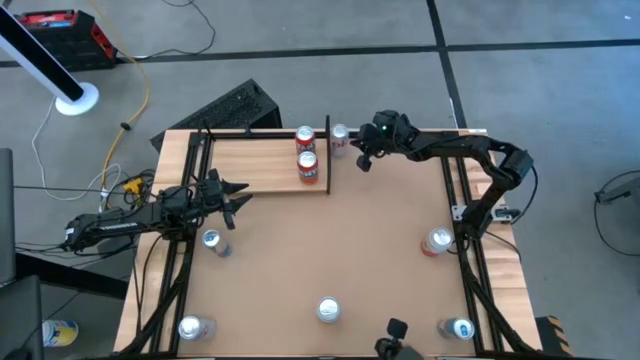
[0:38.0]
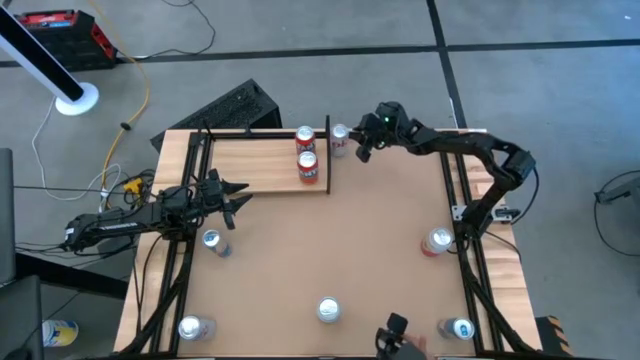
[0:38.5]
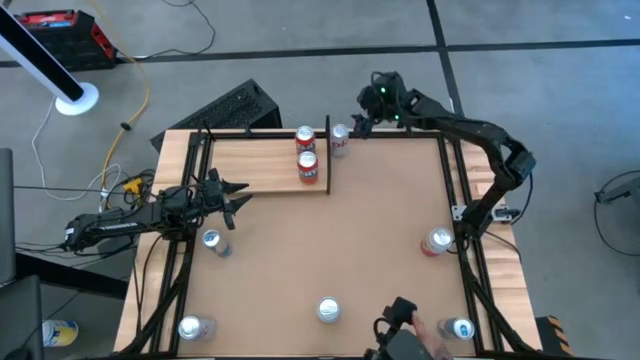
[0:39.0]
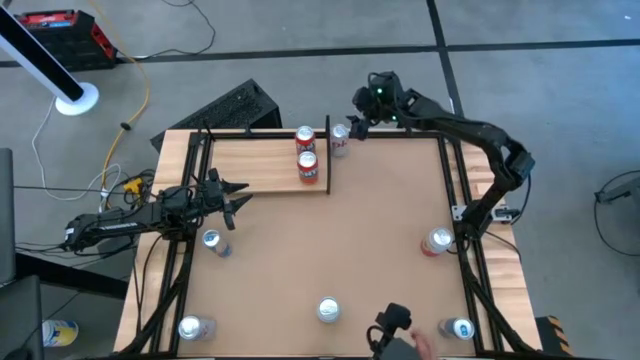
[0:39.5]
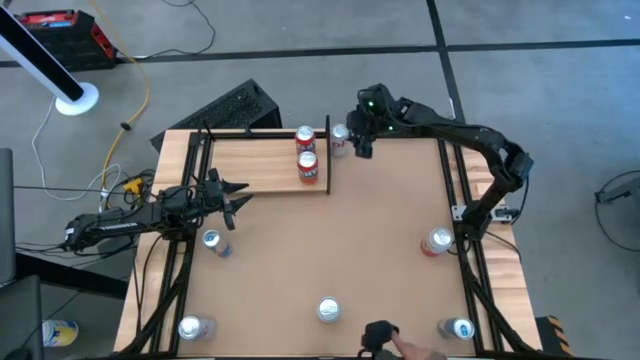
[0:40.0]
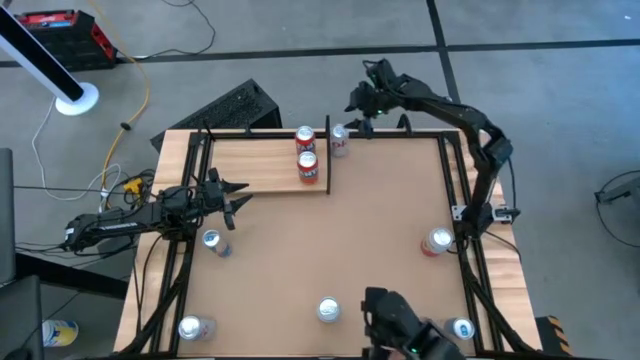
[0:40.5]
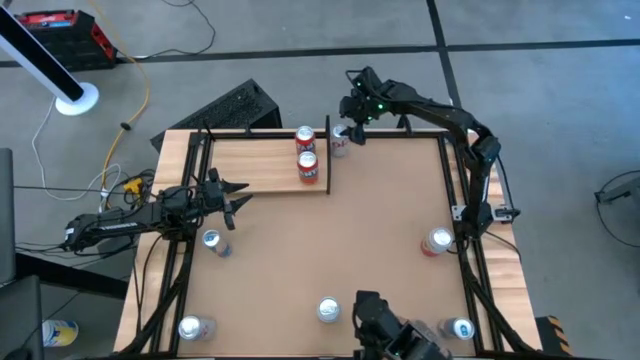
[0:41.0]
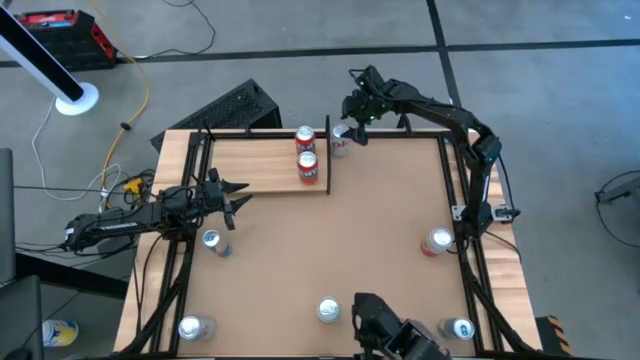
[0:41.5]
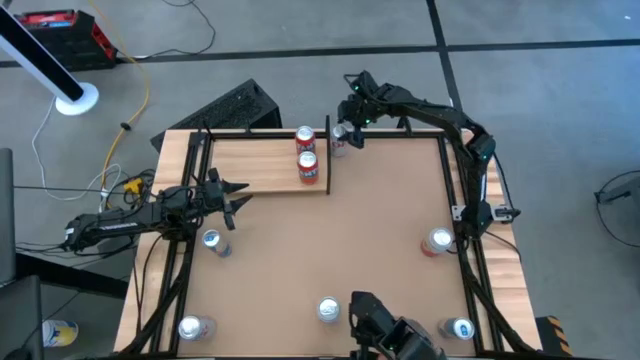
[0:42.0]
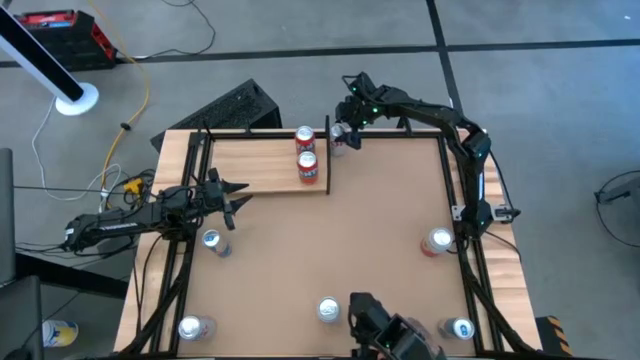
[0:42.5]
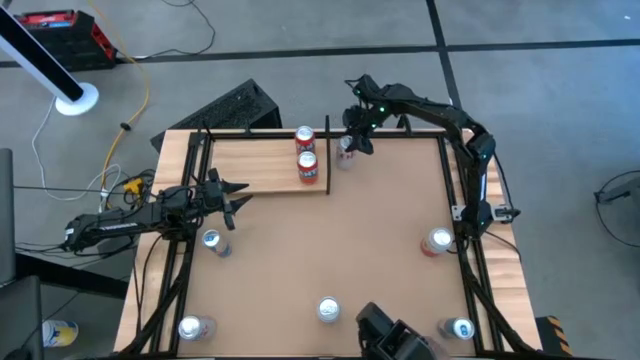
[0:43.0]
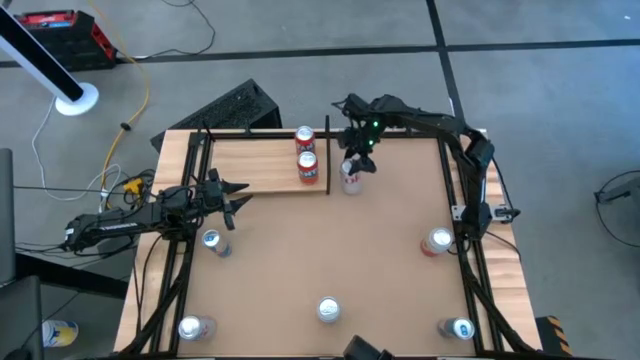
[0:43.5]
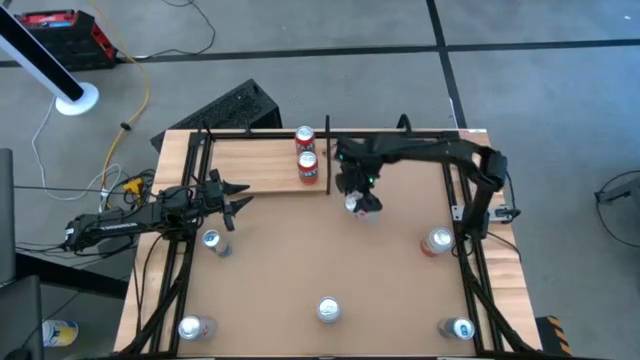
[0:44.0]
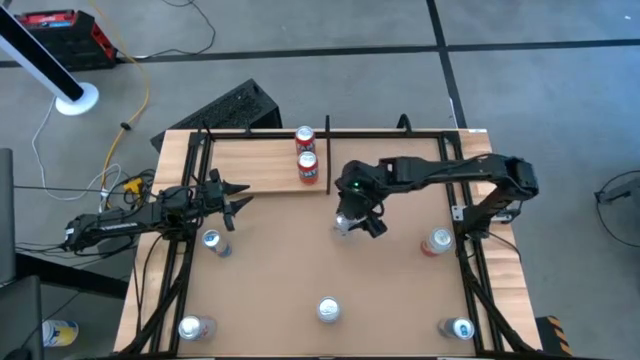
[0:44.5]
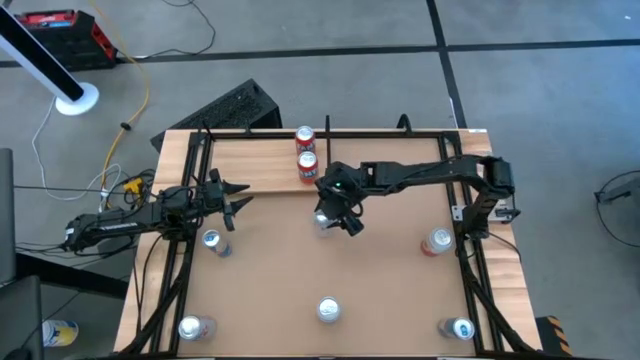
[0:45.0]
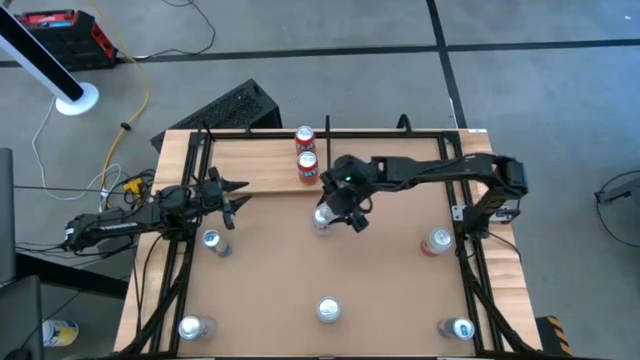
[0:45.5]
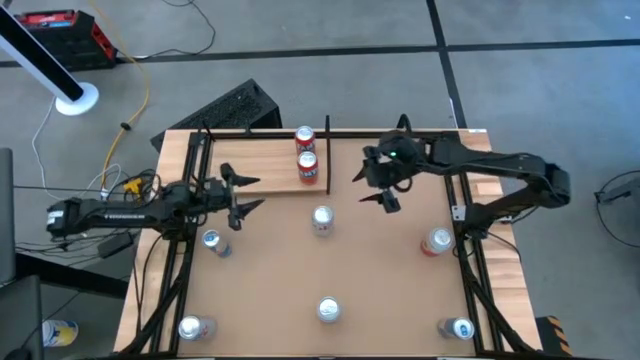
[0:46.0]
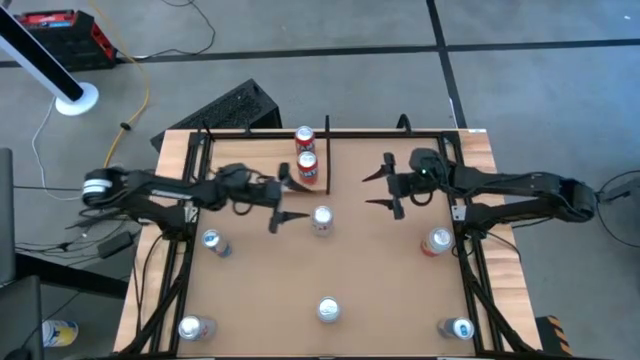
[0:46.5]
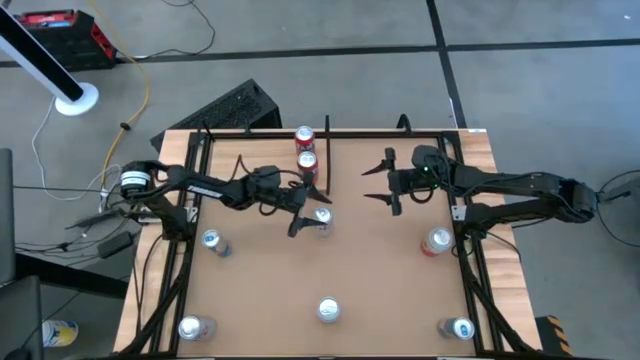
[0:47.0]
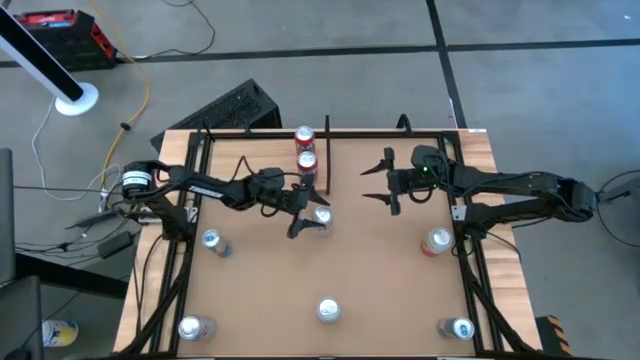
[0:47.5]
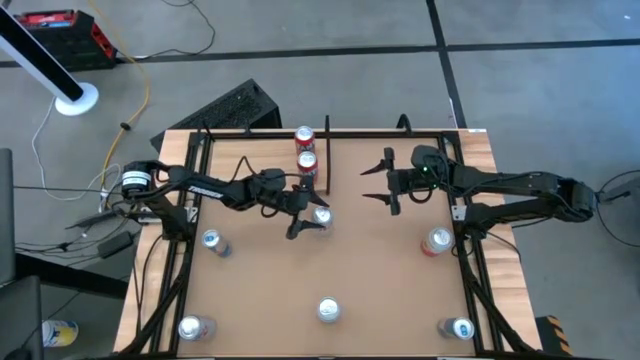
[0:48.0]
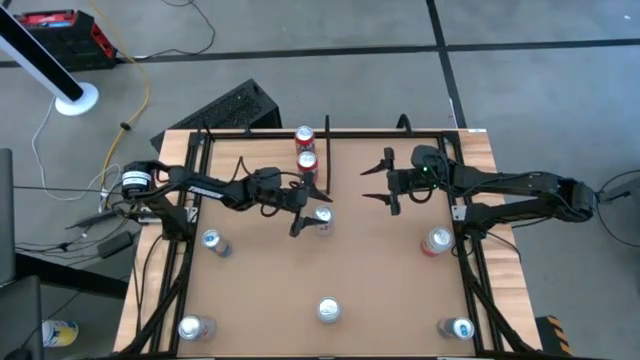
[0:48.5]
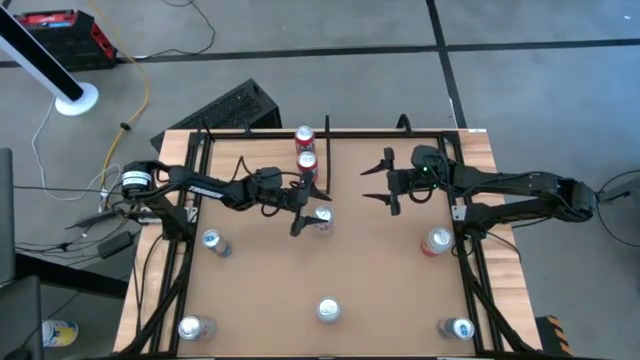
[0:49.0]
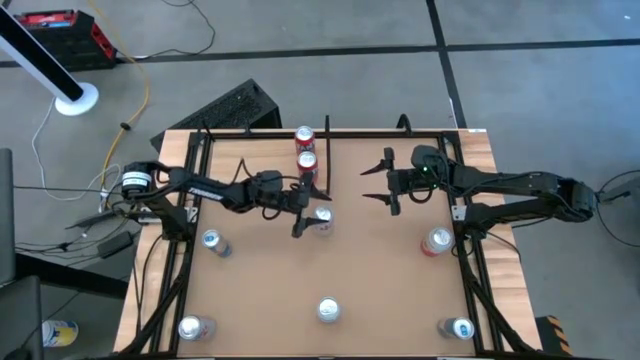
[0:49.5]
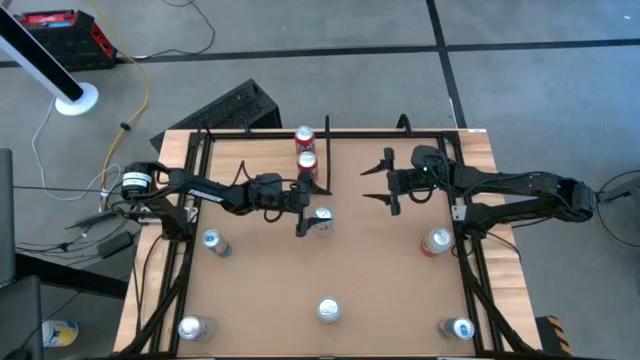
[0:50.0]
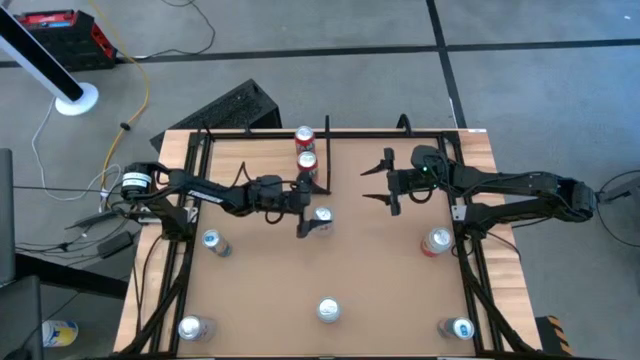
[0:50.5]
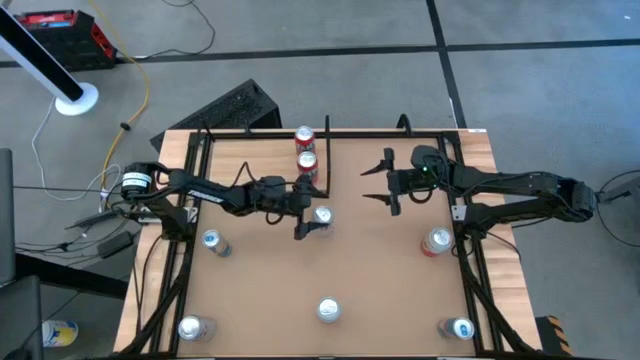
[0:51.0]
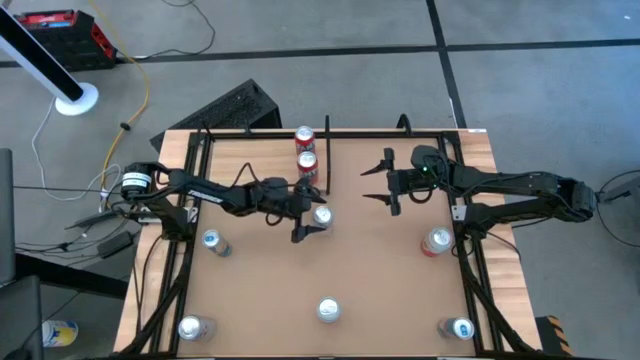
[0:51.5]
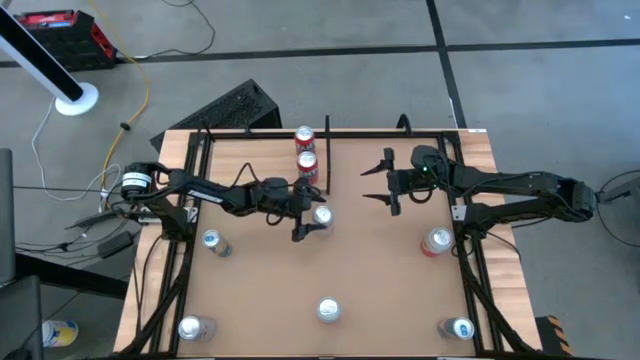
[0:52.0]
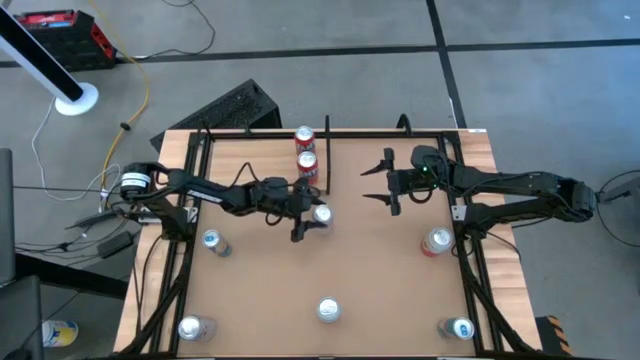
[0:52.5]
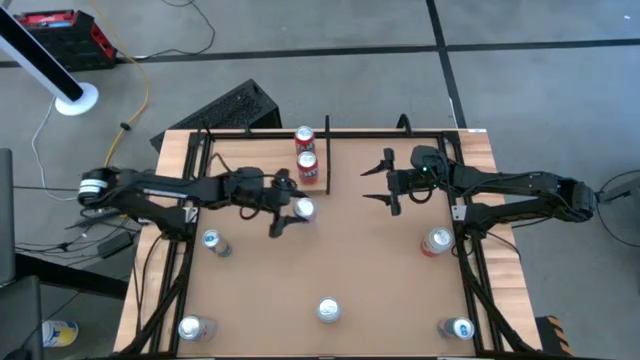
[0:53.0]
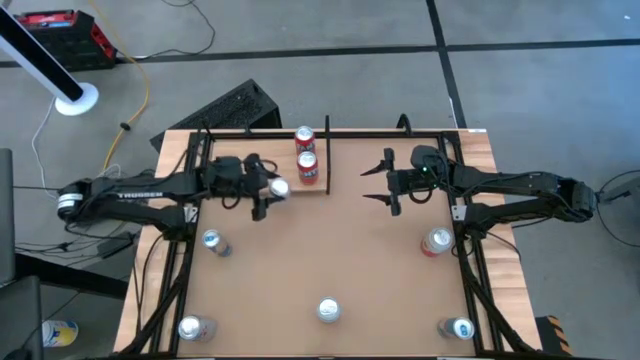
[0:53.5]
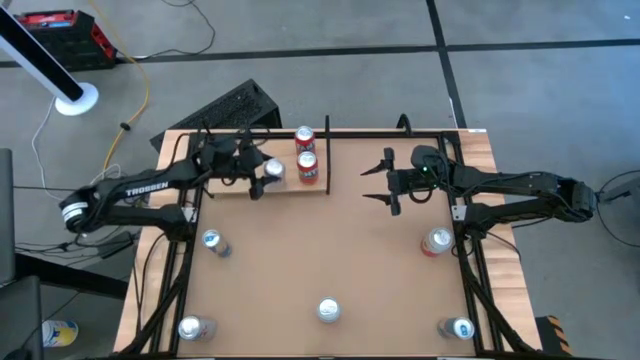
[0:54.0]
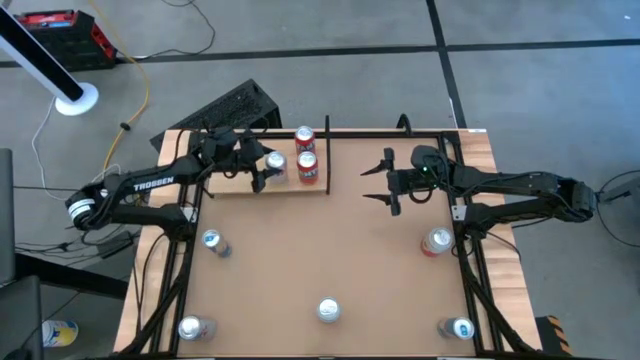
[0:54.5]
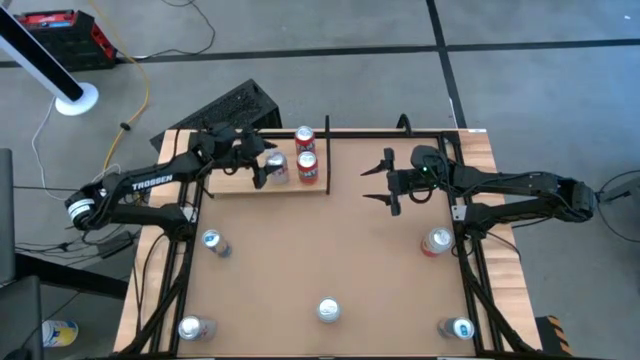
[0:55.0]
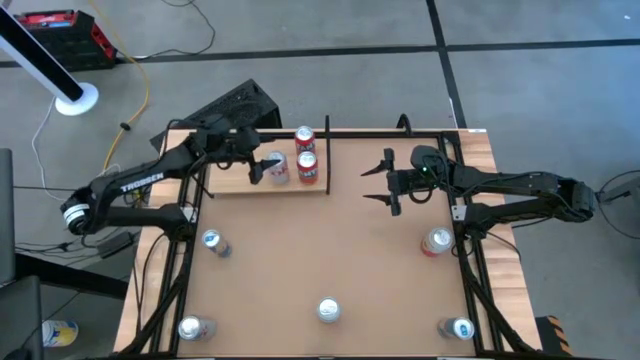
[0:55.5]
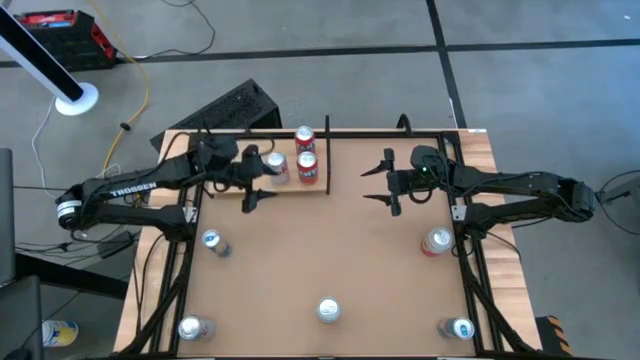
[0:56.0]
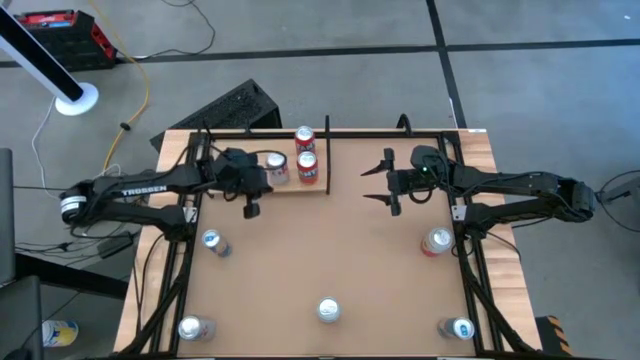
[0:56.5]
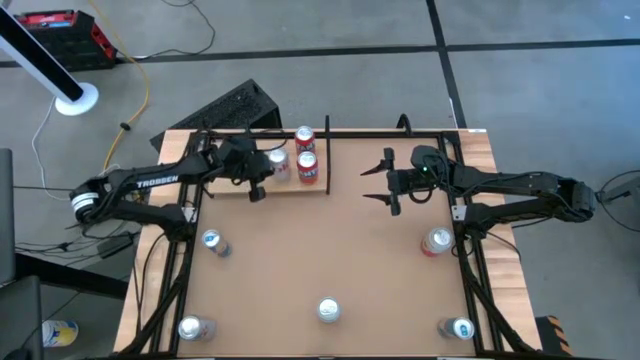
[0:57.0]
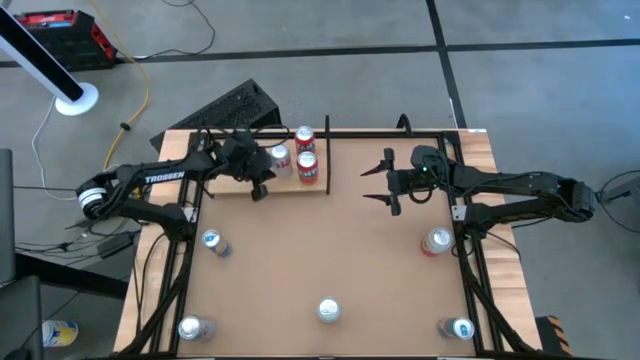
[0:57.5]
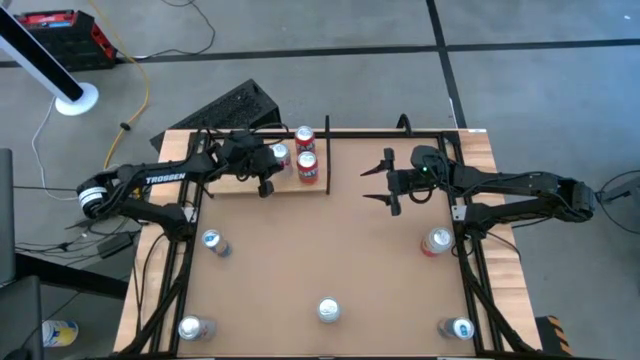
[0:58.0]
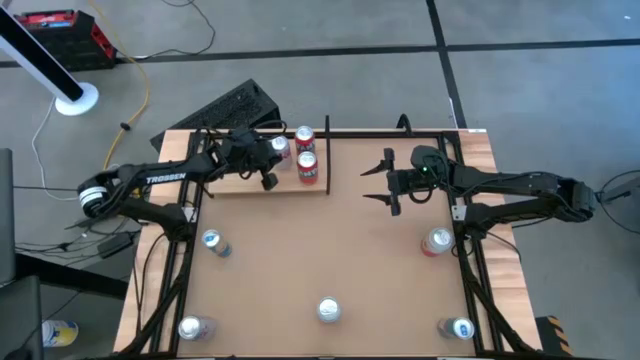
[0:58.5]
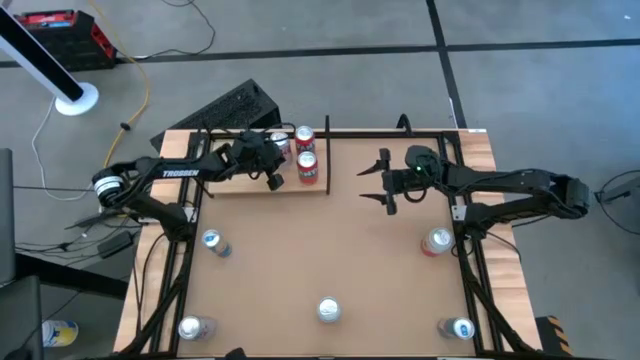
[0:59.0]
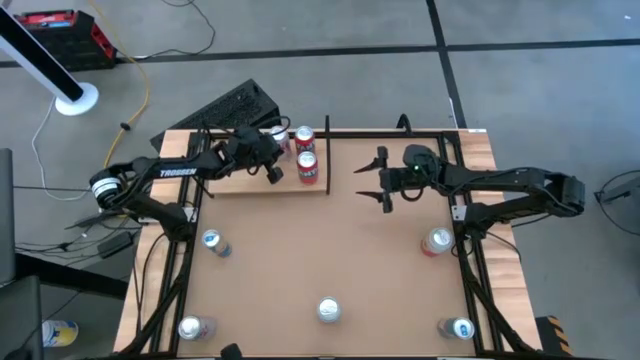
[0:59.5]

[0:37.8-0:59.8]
Task: Place canned beverage on shelf
Put the top-red silver soda can on the shelf
